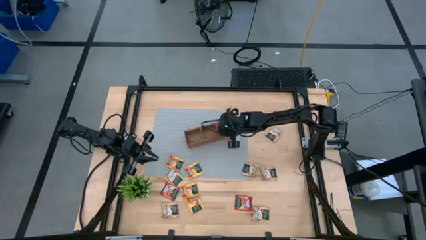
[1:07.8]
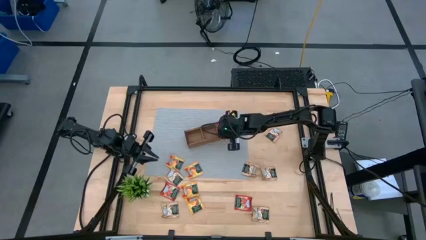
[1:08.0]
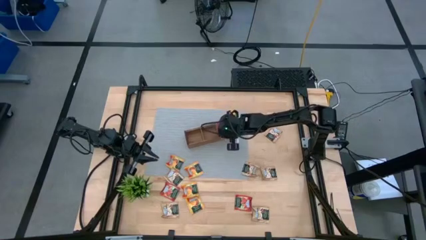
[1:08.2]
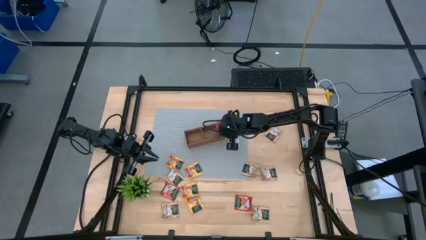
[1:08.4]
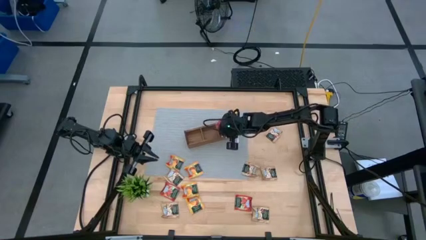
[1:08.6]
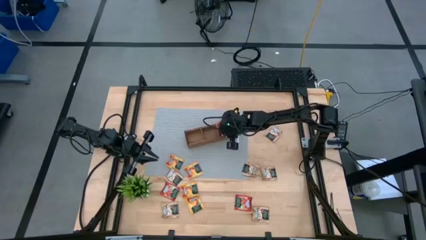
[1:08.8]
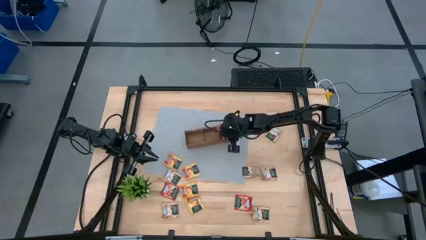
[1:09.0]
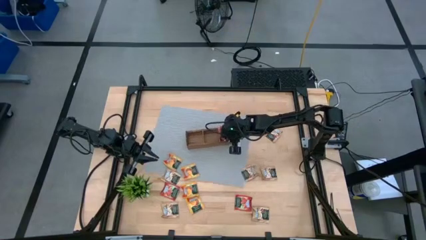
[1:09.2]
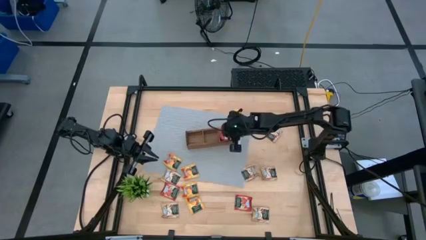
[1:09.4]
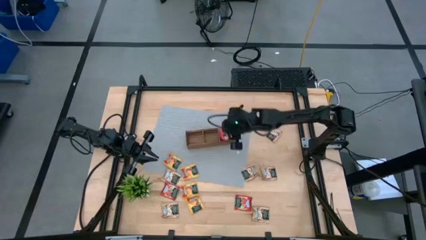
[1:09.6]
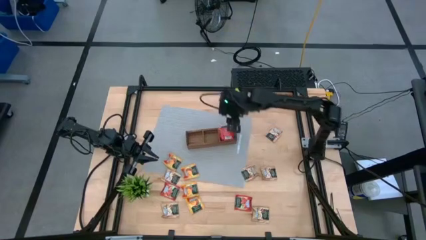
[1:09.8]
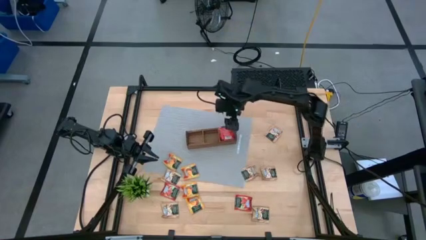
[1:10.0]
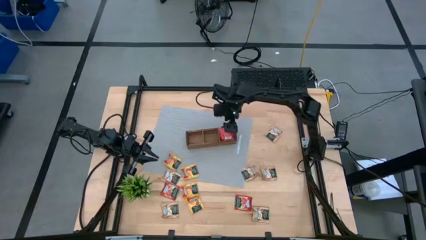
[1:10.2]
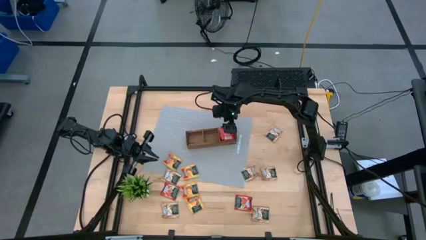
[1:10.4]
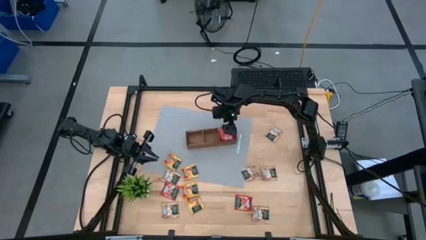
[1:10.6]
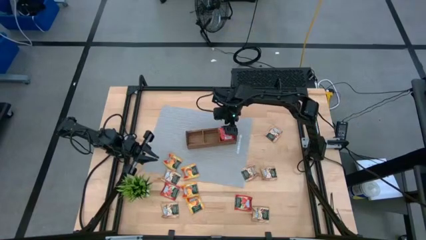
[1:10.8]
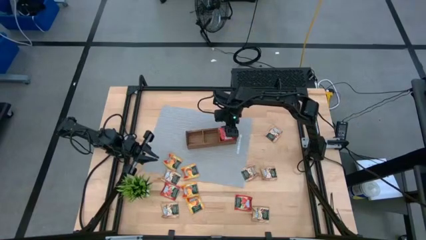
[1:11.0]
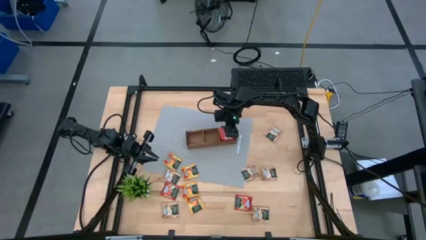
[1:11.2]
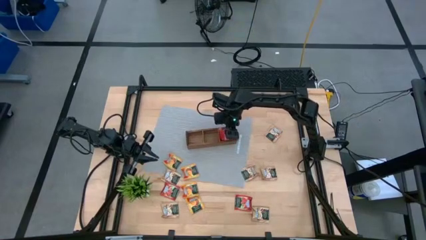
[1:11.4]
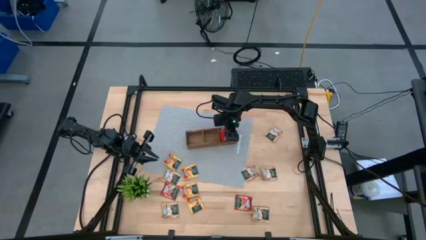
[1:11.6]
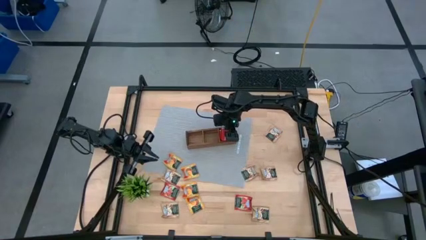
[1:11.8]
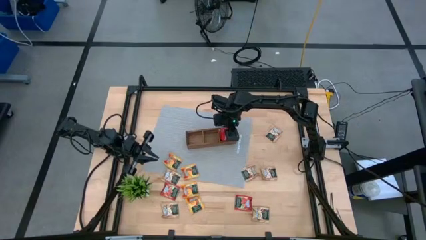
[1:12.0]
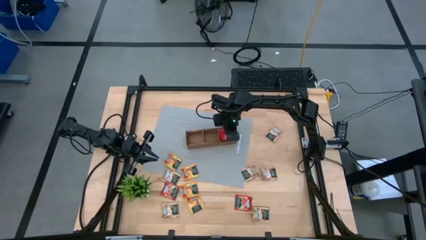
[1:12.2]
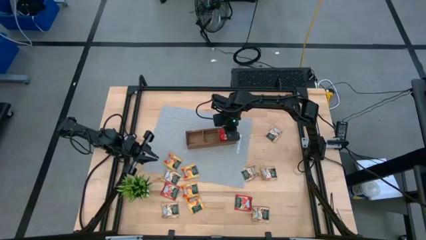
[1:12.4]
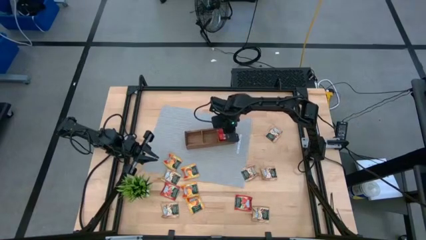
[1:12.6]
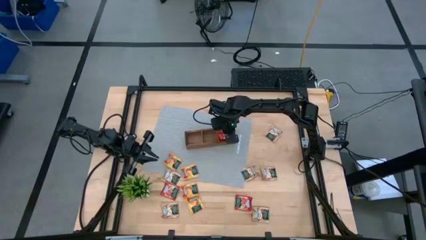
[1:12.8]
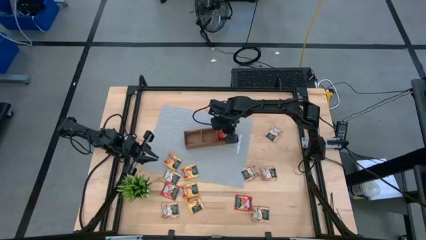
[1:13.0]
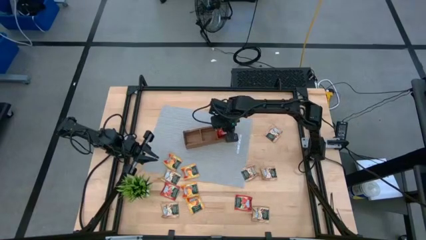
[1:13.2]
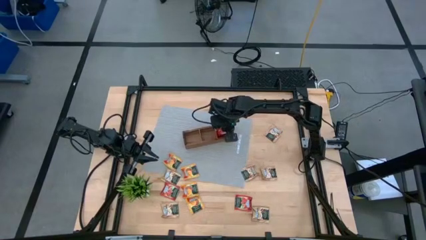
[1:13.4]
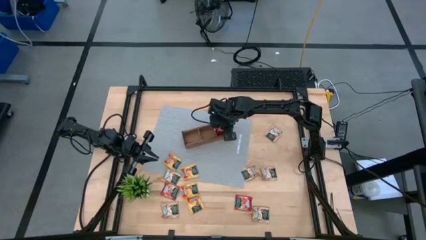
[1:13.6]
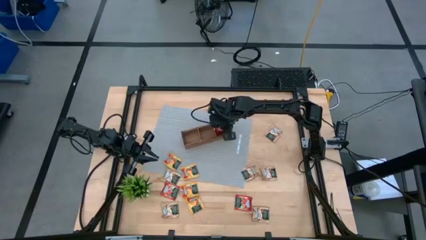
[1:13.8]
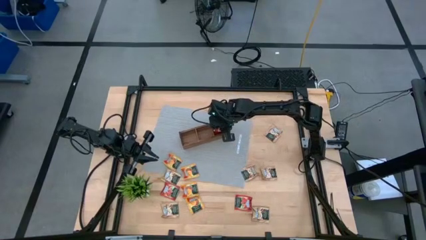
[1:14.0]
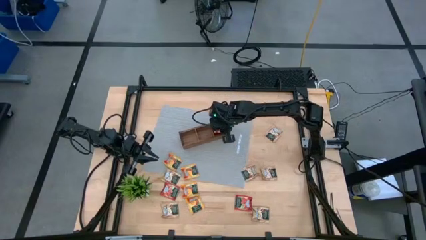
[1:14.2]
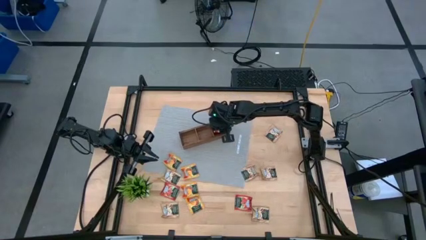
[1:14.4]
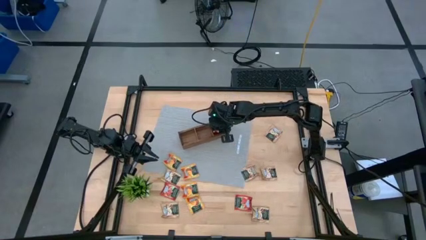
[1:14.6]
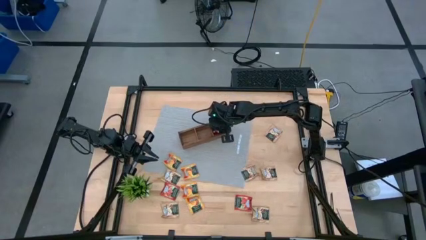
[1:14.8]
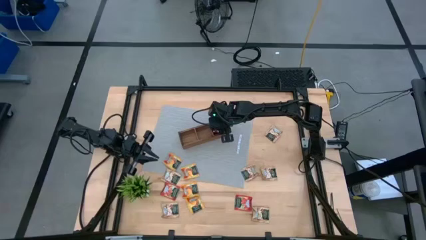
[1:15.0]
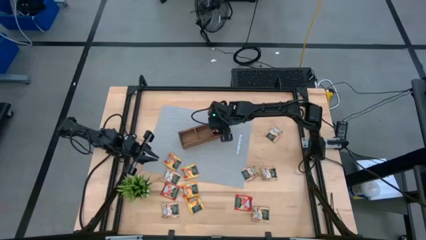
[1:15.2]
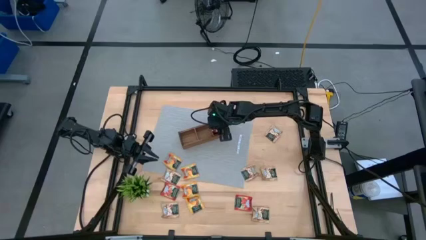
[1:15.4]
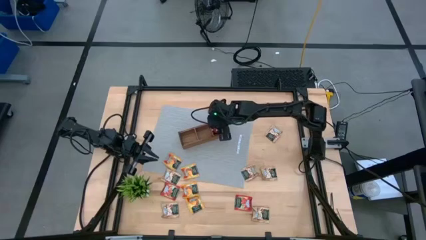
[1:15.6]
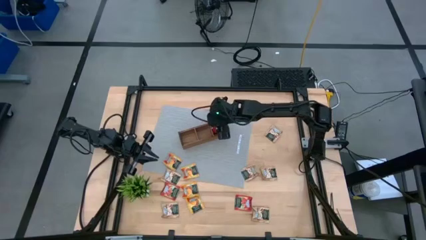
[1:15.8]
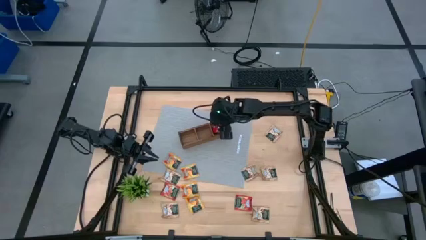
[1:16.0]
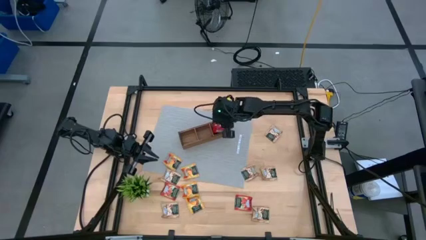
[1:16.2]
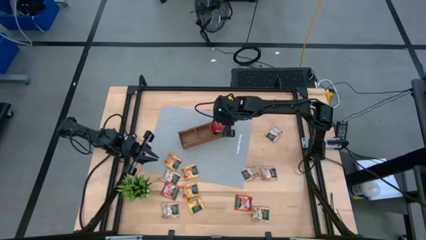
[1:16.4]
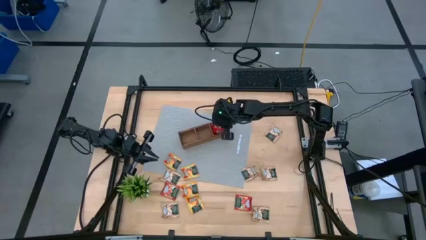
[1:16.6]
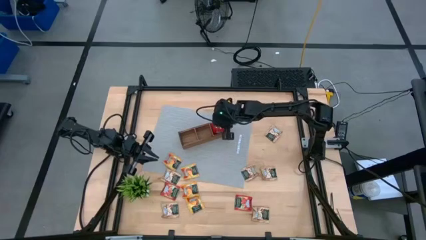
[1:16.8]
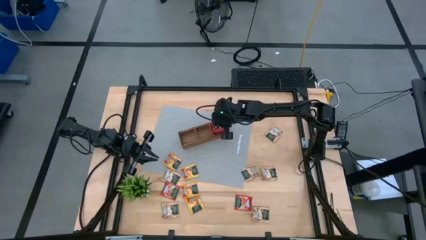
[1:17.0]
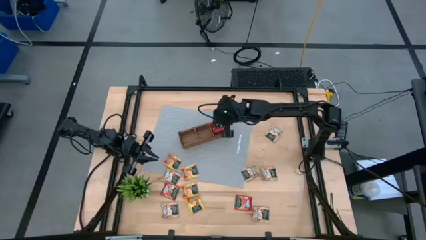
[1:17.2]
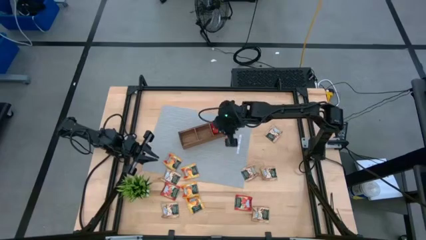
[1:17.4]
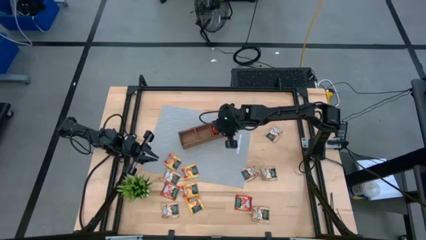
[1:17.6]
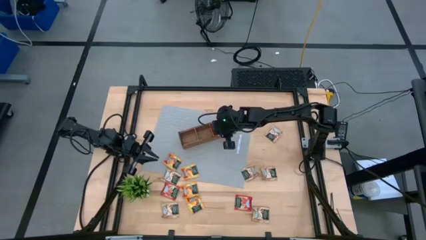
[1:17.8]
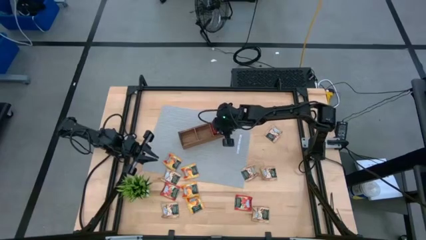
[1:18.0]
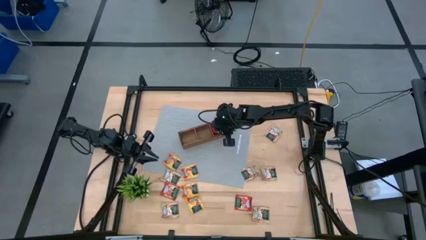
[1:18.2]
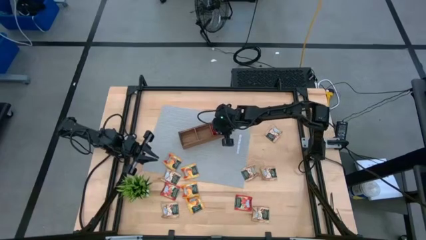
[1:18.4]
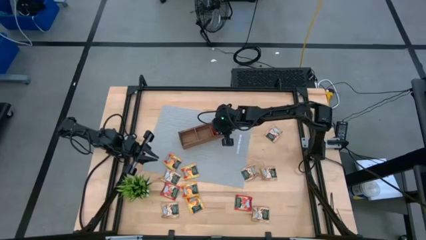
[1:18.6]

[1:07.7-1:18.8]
Task: Pick & Place Tea
Put the red tea bag into the wooden organizer

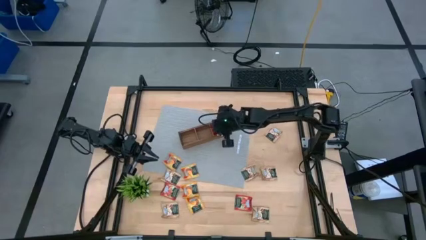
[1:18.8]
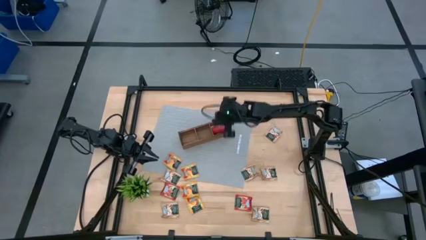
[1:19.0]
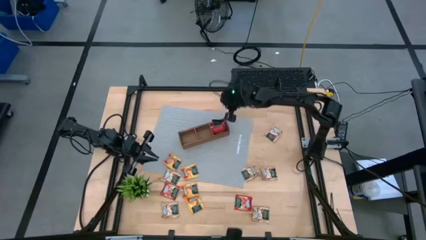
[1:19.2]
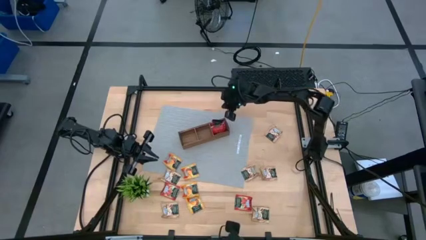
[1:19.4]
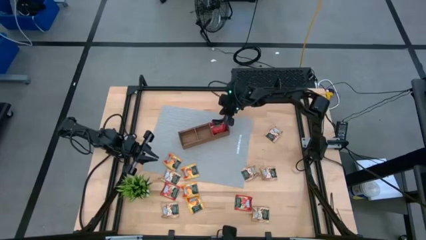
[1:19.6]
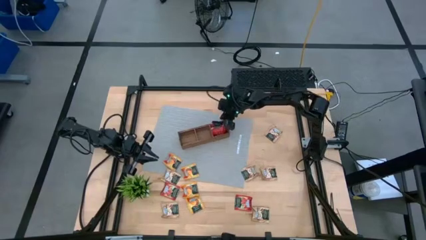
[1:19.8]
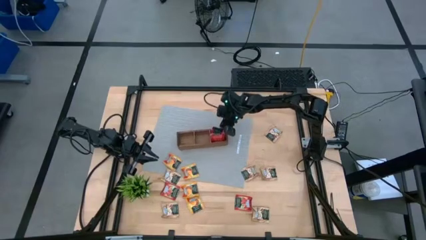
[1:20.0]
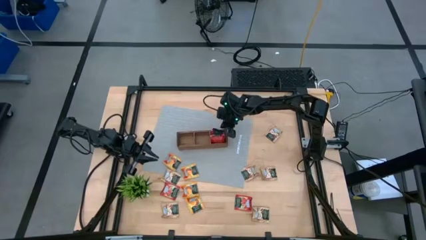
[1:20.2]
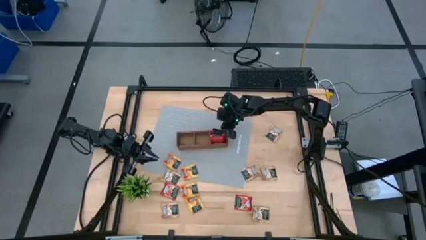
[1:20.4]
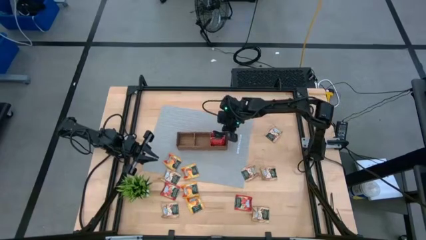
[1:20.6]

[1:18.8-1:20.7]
Adjust the wooden organizer

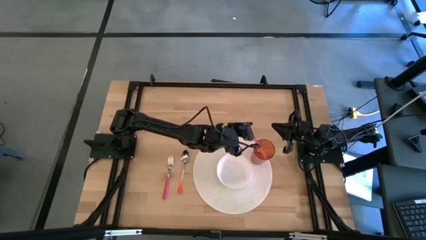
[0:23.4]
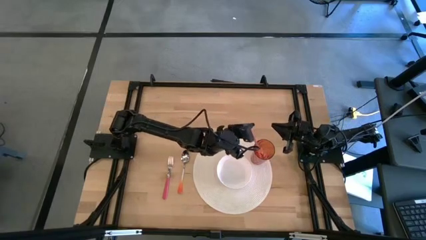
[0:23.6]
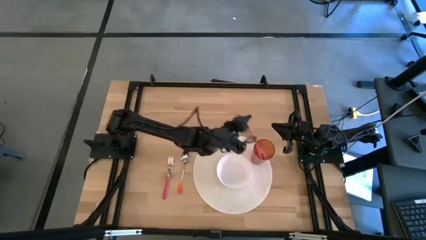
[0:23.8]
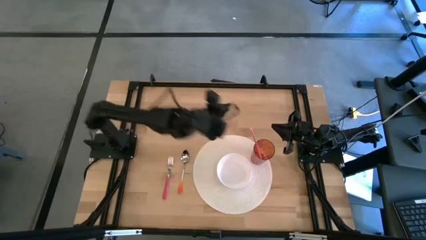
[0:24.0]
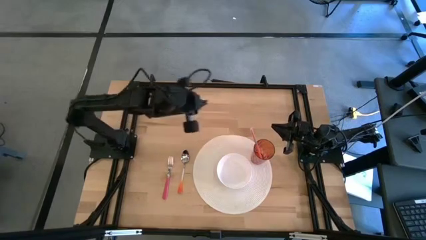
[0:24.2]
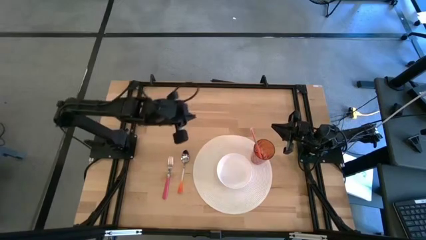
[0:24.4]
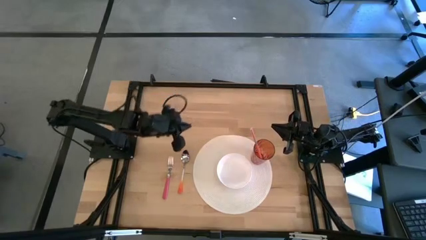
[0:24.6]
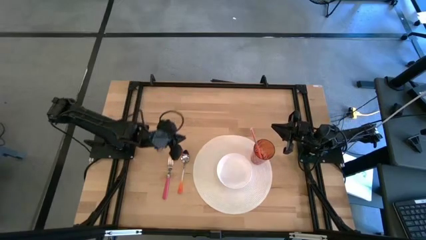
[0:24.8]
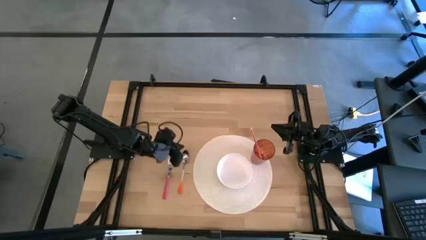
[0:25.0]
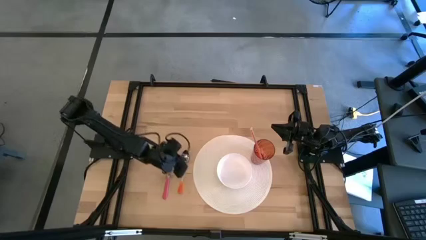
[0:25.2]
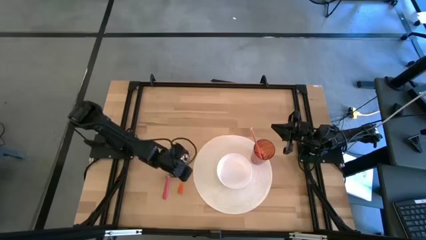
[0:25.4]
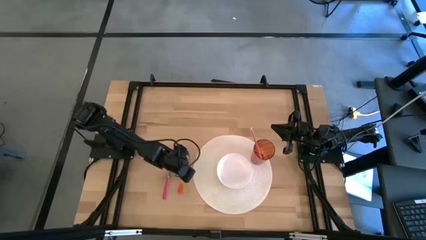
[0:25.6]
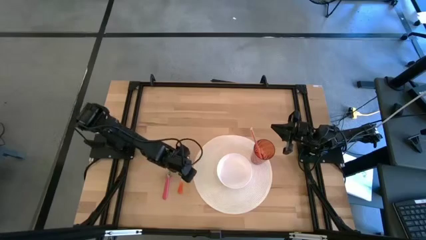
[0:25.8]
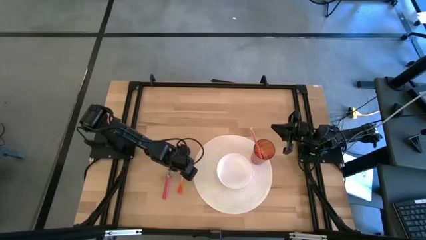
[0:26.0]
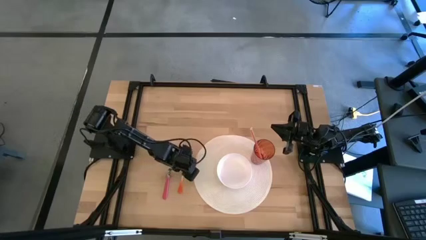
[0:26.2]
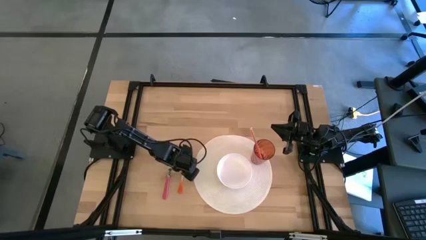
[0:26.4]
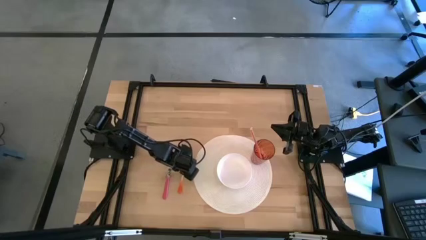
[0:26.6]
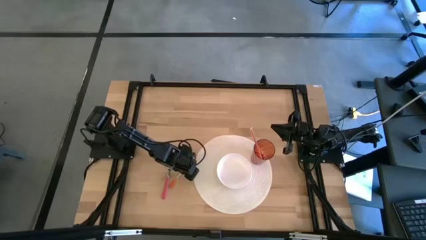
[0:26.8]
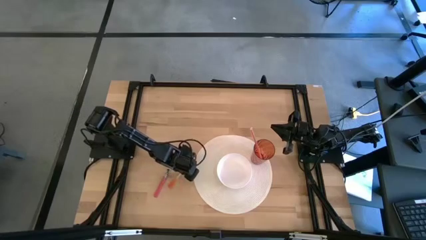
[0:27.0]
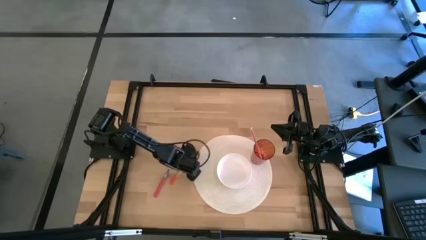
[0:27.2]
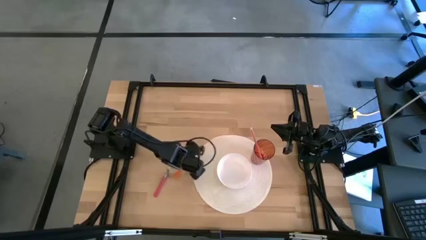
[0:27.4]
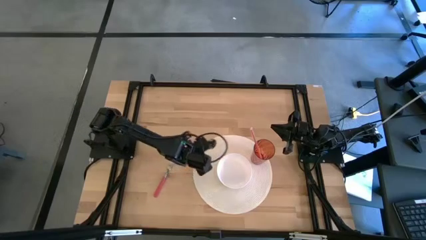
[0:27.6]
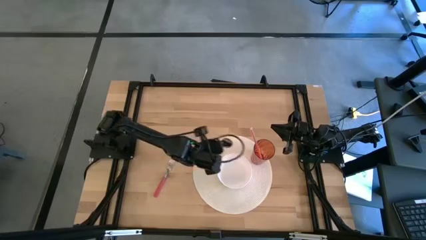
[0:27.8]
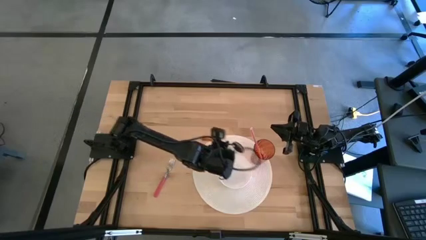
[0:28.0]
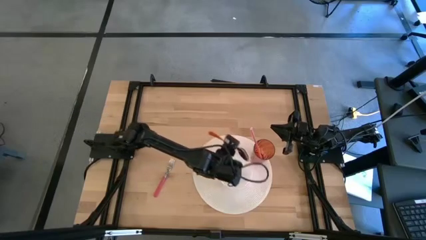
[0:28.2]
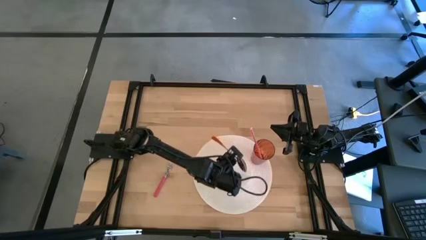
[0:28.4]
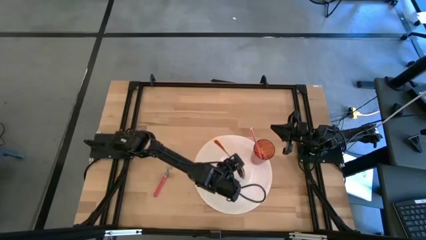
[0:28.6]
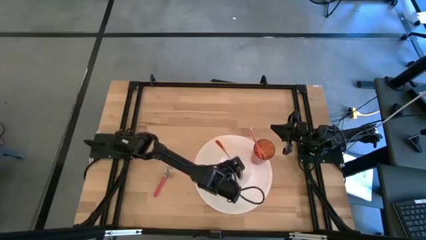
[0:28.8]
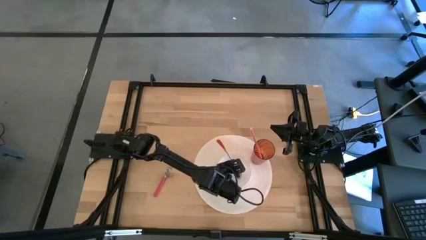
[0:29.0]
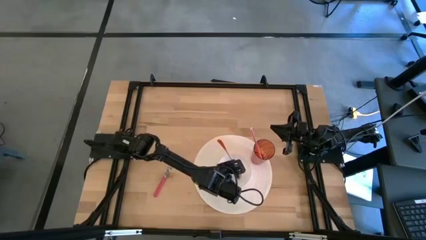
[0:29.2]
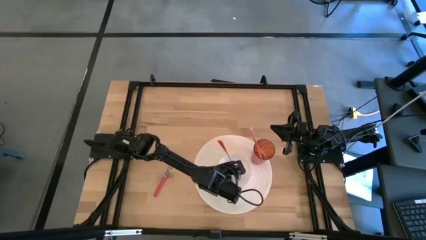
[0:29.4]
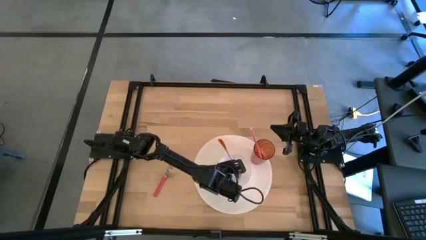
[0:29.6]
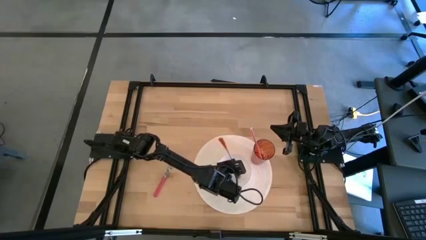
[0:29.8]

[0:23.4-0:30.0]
Task: Pick & Place Utensil
Put the orange spoon into the white bowl on the white mat
